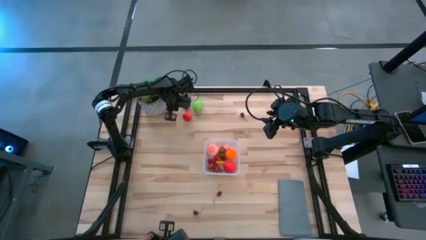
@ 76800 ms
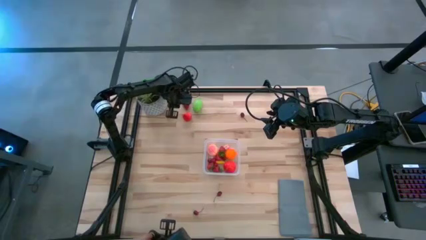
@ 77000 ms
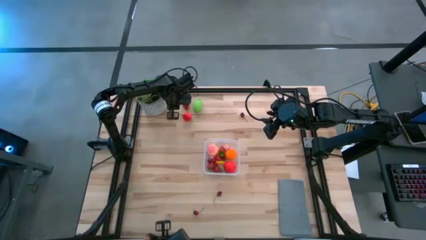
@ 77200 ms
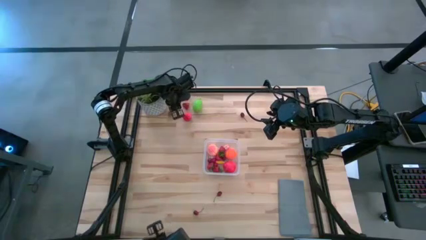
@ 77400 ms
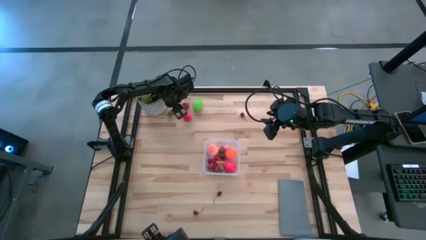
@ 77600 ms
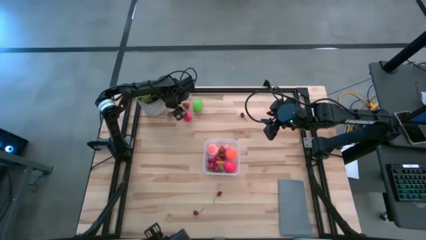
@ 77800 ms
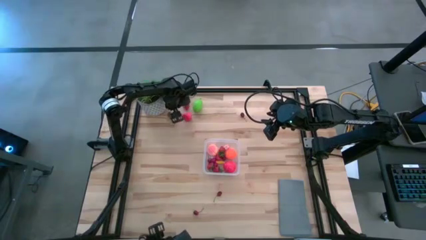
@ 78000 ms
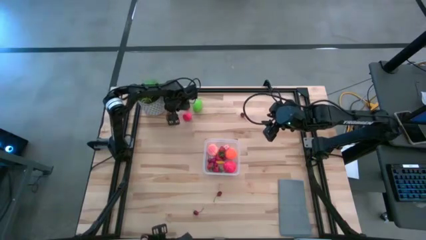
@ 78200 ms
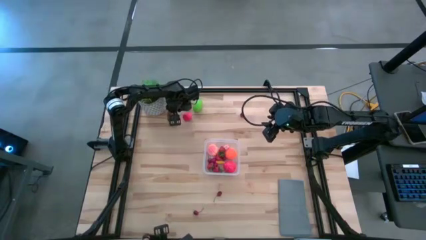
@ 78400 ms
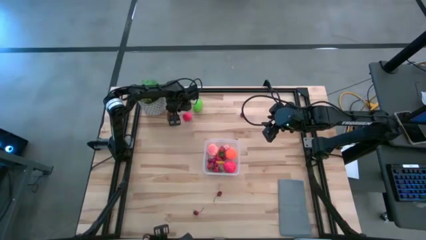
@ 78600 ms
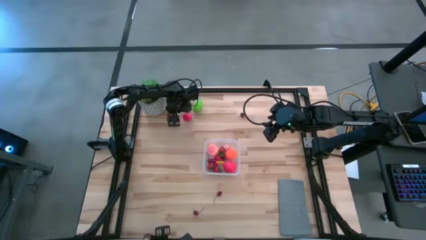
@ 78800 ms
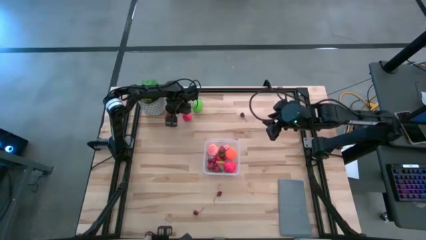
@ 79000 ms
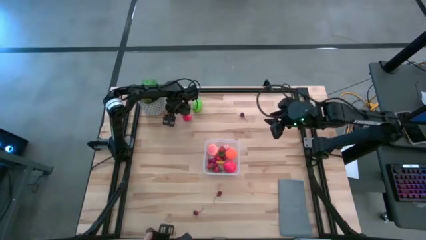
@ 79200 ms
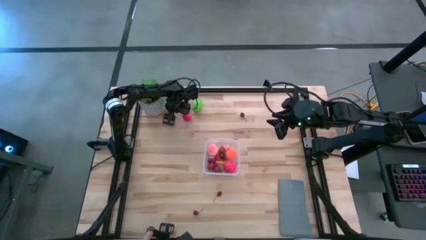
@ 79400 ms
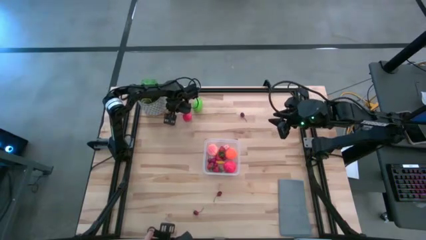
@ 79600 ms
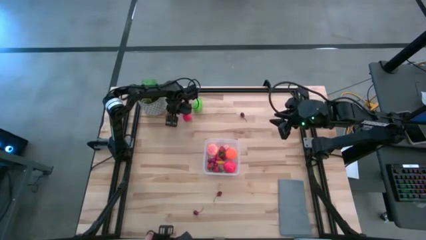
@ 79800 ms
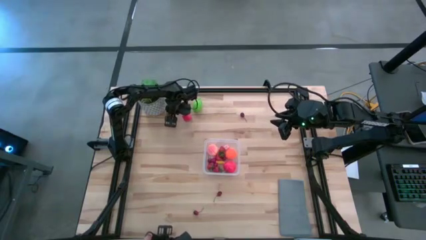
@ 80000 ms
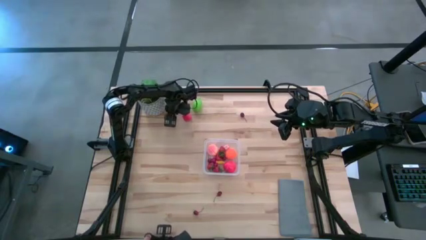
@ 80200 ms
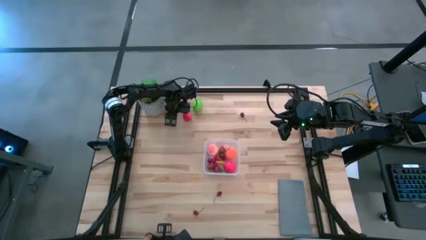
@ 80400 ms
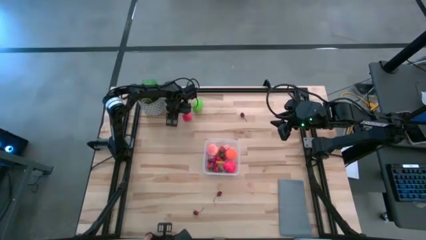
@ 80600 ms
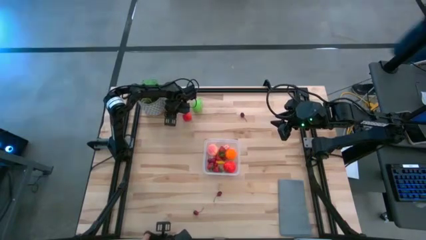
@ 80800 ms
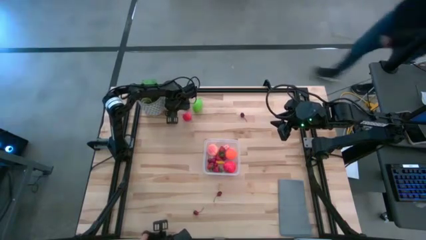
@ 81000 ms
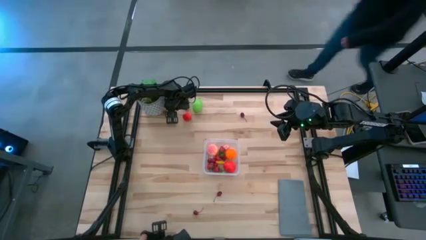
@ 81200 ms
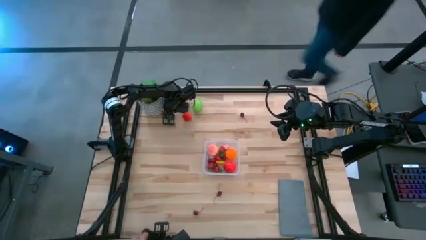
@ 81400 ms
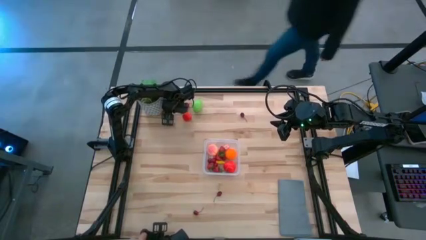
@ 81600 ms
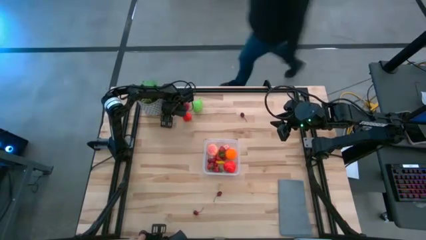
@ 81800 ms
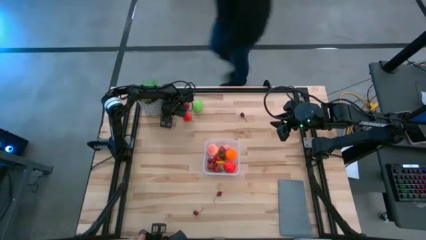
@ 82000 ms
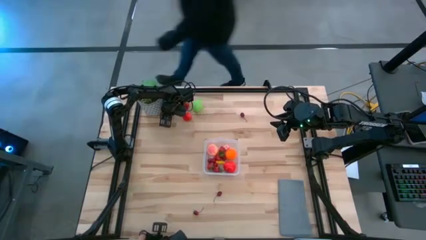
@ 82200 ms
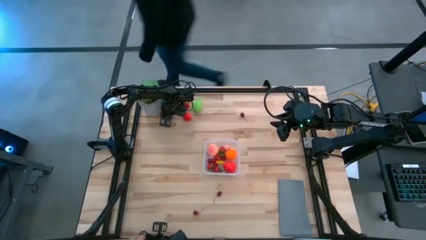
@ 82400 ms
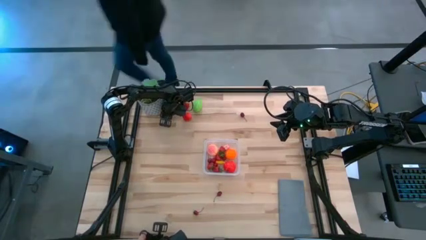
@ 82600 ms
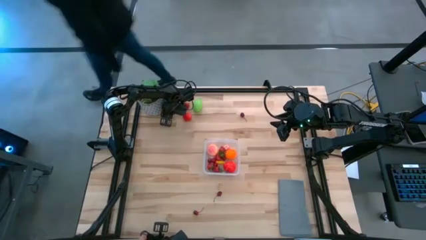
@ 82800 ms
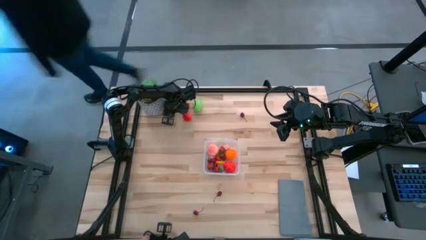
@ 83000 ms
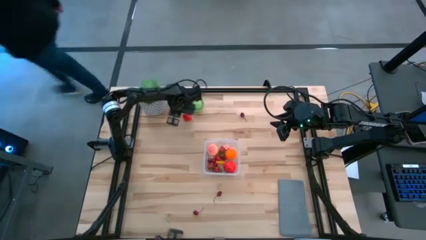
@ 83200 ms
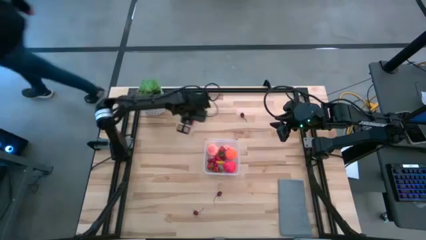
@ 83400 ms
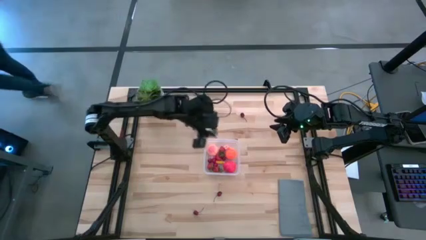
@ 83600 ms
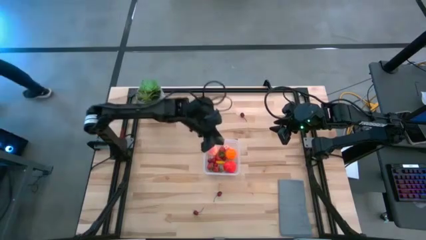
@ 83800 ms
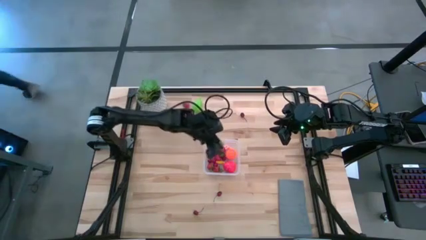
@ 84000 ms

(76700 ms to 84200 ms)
Task: Pick and placing Produce into tupperware
Put the red strawberry into the transparent container

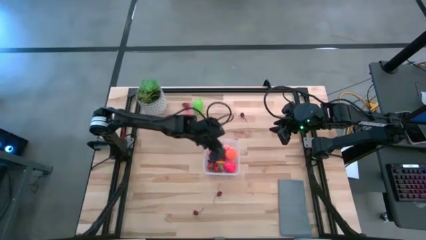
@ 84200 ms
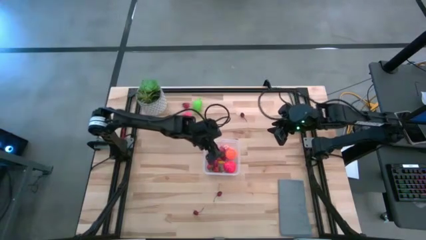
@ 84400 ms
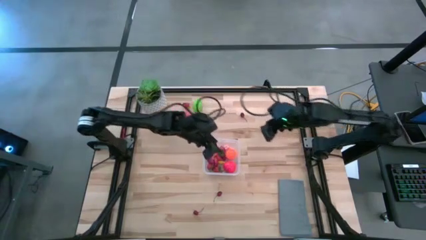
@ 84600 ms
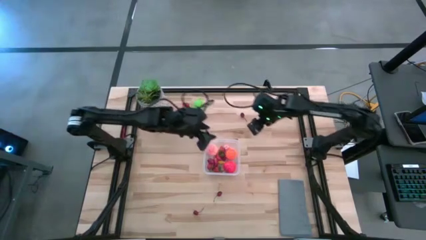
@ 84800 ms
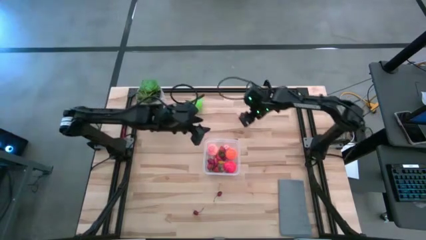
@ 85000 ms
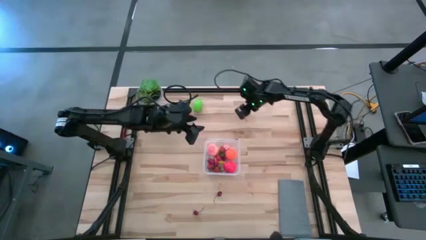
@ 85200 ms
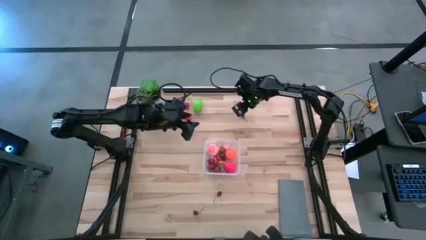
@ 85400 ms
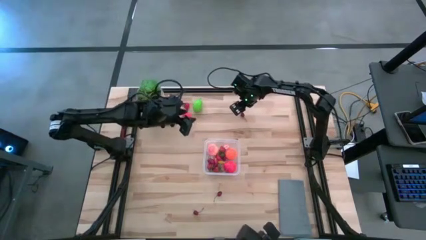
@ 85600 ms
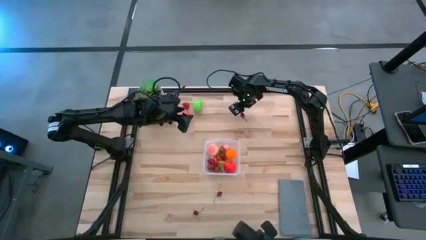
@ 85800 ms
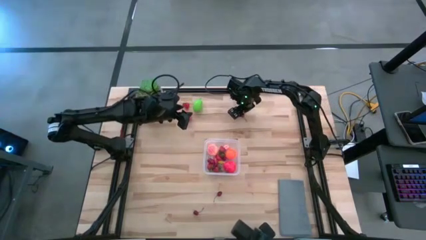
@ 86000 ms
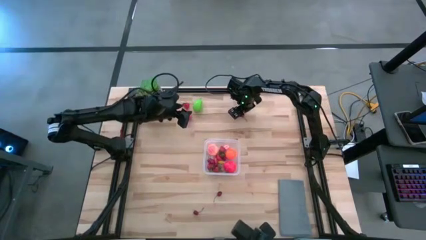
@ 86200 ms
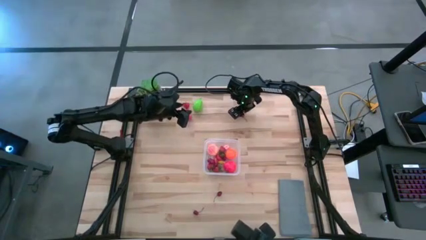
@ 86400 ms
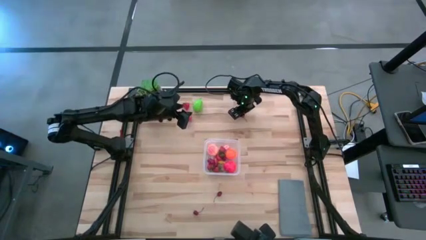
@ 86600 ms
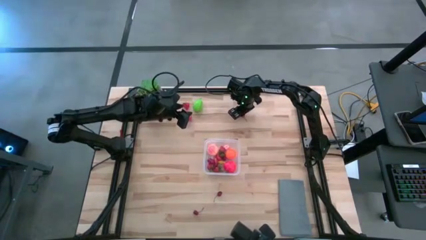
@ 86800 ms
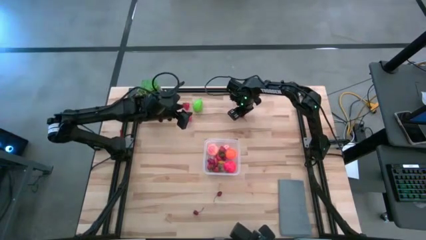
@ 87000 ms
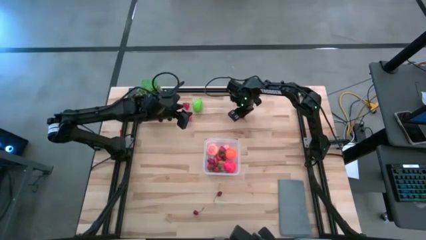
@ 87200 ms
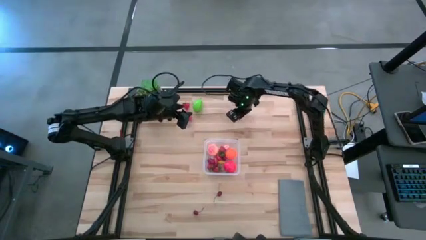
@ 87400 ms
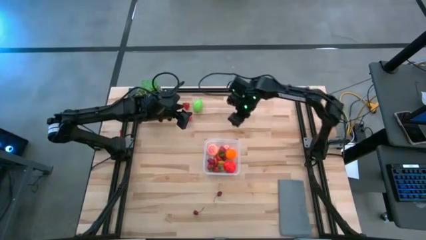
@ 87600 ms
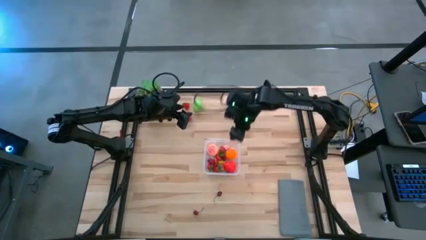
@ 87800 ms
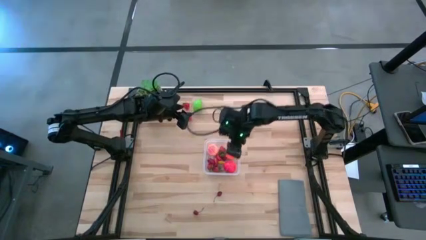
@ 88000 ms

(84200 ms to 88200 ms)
Put the red cherry into the transparent container

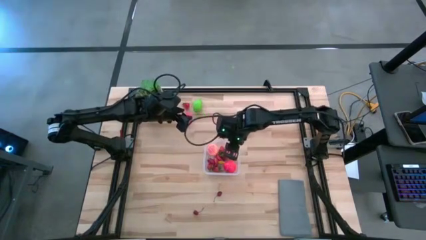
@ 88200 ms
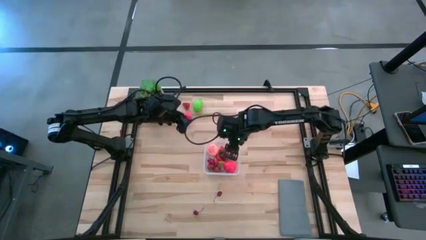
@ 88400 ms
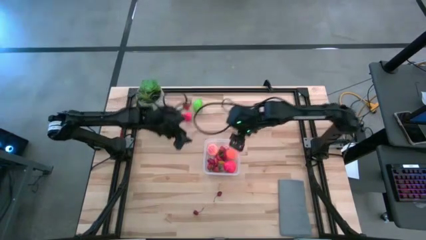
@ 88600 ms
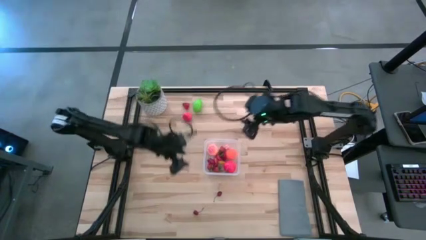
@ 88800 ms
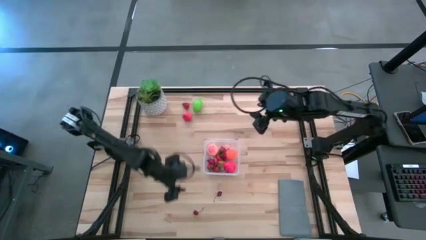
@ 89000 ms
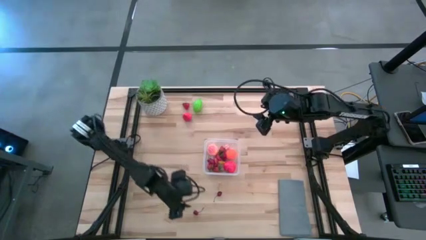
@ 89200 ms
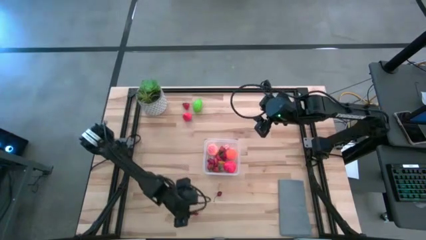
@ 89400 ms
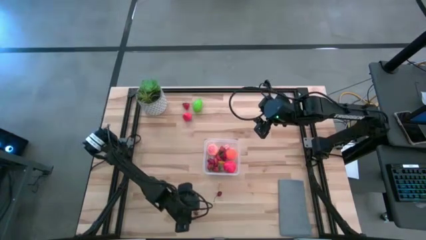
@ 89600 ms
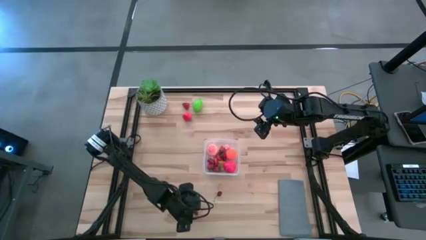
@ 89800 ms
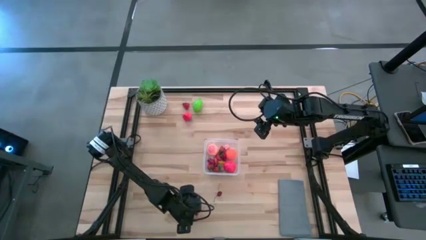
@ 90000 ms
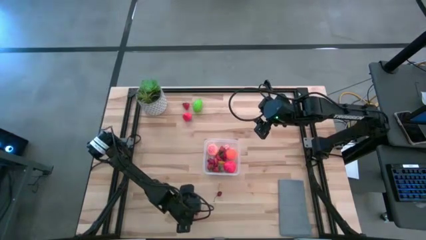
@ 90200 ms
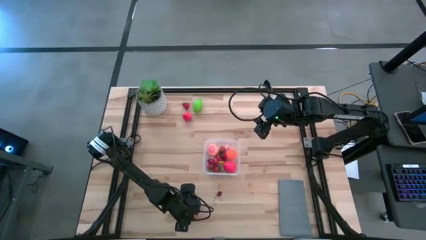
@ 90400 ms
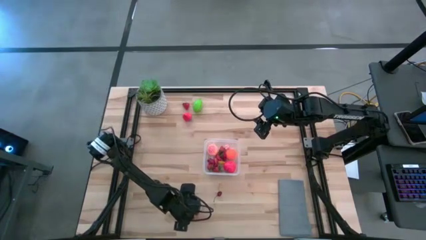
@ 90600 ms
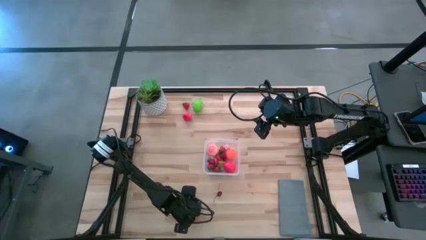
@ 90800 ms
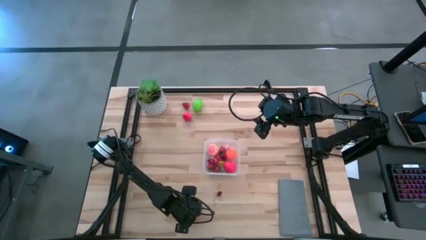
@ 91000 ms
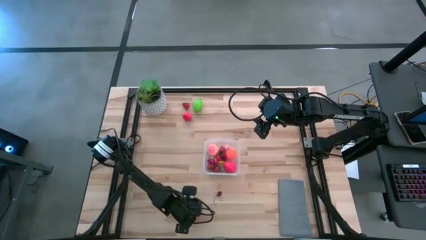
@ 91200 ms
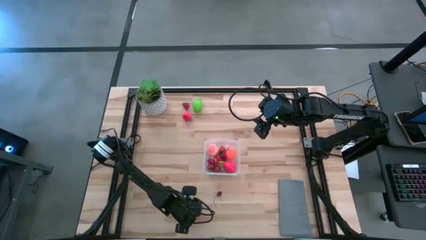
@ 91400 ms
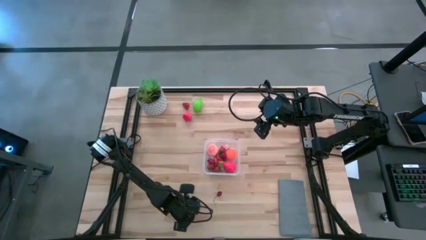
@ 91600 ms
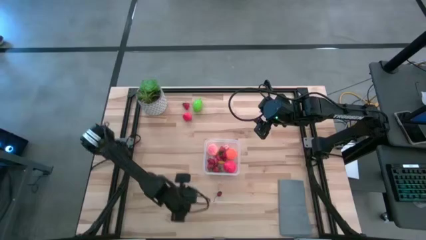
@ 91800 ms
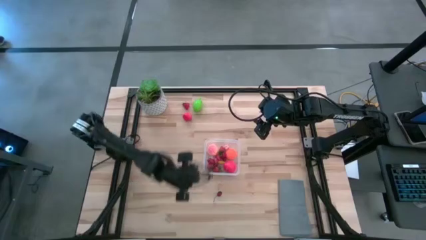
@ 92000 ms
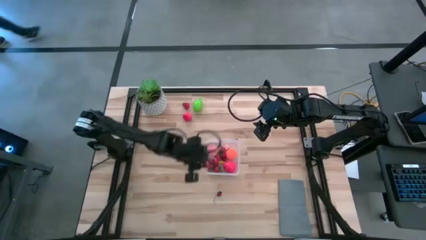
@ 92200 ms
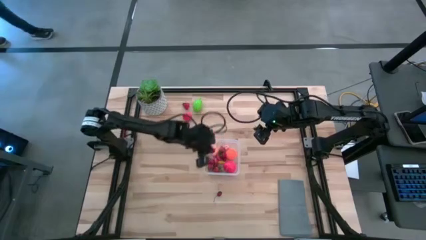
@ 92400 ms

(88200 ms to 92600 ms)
Put the red cherry into the transparent container
